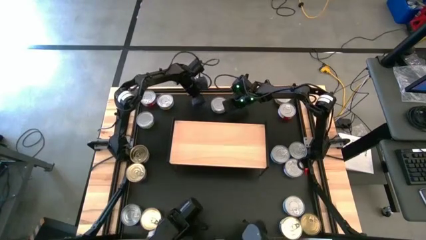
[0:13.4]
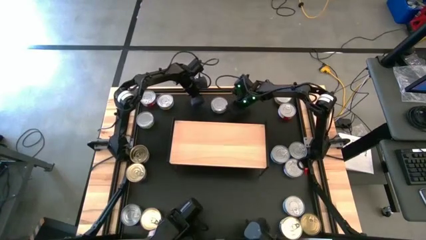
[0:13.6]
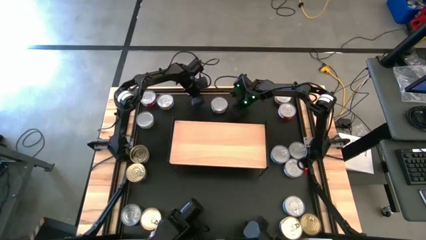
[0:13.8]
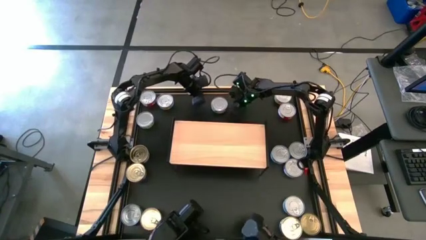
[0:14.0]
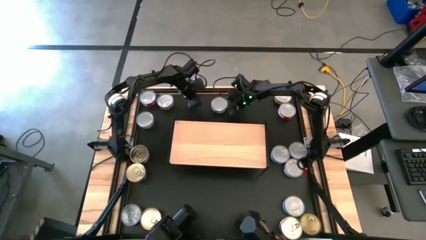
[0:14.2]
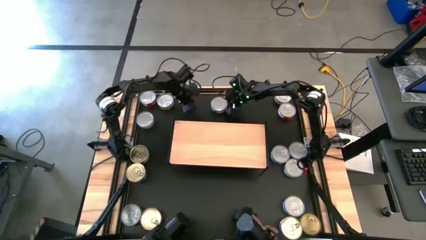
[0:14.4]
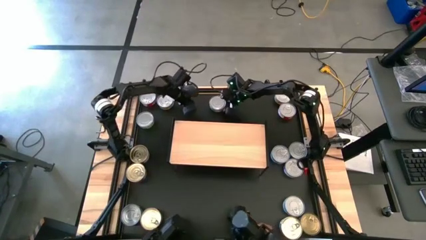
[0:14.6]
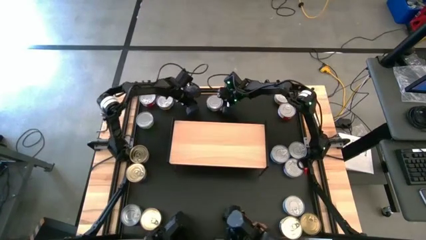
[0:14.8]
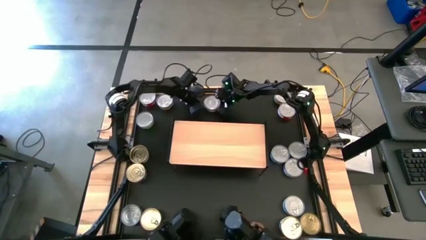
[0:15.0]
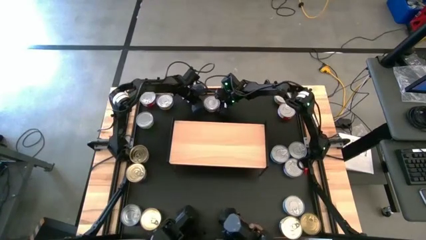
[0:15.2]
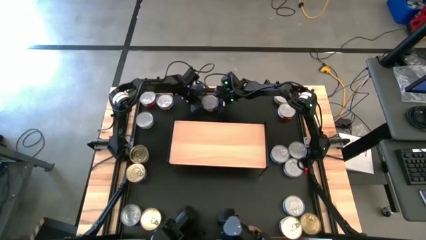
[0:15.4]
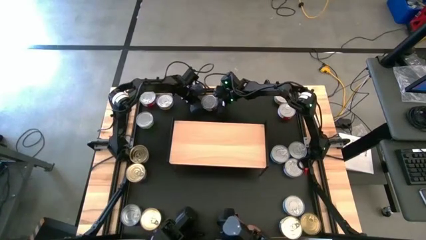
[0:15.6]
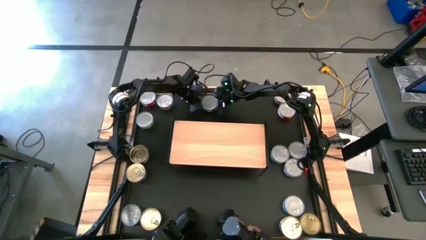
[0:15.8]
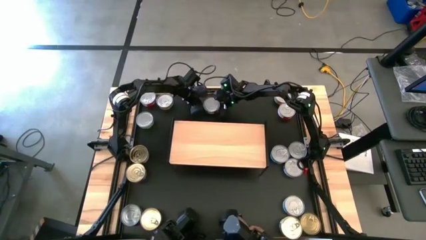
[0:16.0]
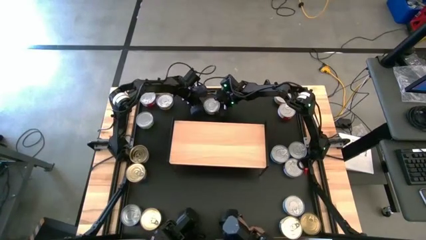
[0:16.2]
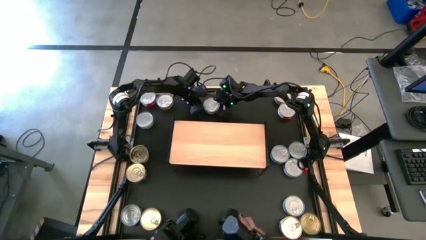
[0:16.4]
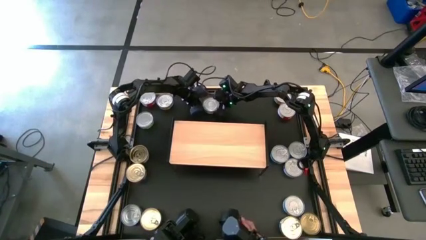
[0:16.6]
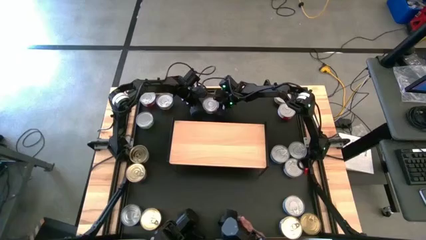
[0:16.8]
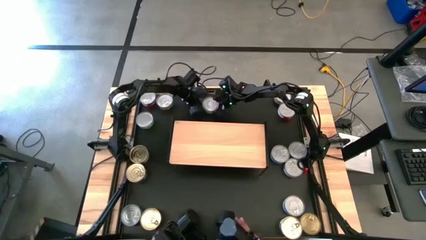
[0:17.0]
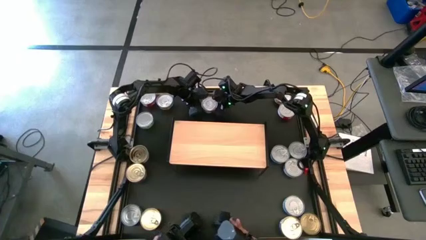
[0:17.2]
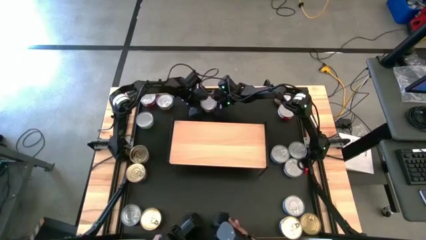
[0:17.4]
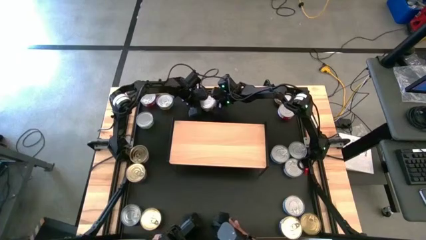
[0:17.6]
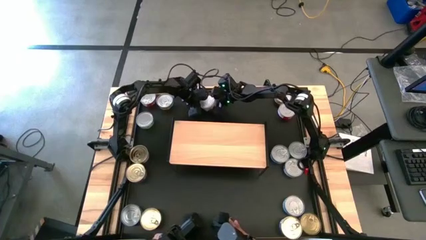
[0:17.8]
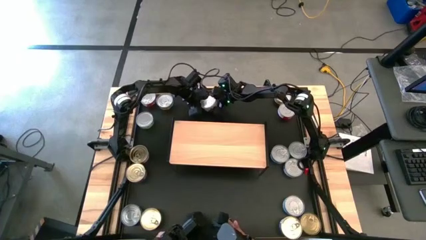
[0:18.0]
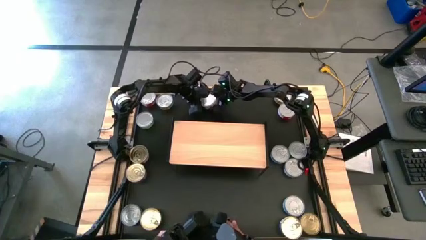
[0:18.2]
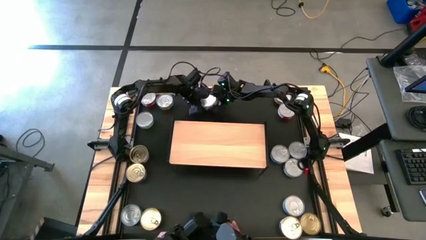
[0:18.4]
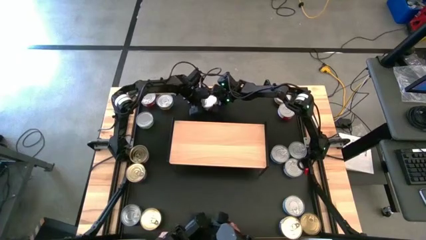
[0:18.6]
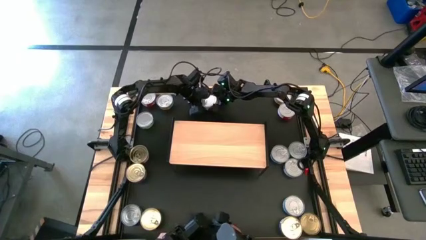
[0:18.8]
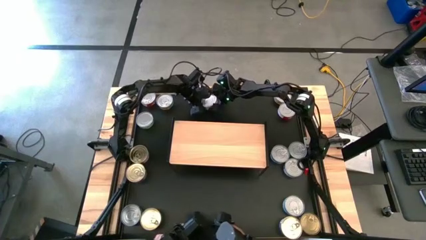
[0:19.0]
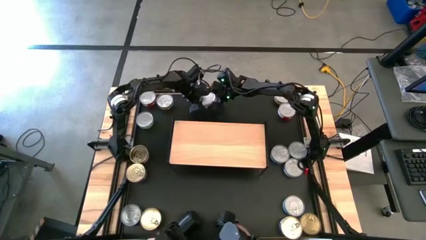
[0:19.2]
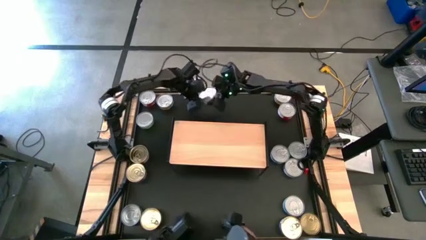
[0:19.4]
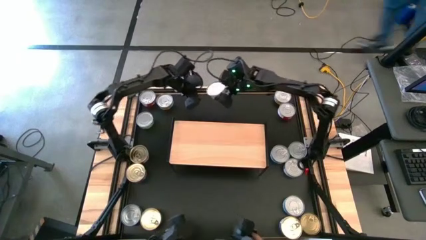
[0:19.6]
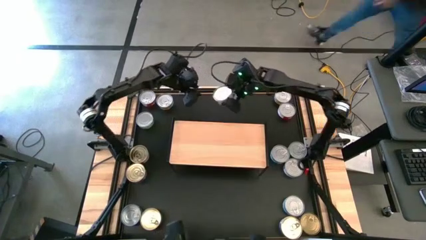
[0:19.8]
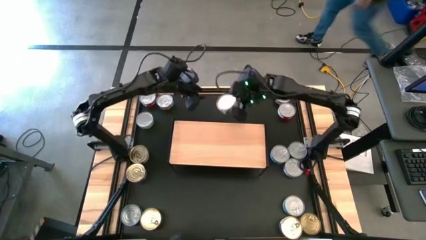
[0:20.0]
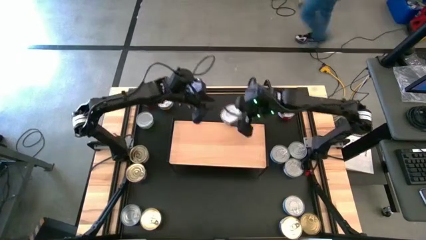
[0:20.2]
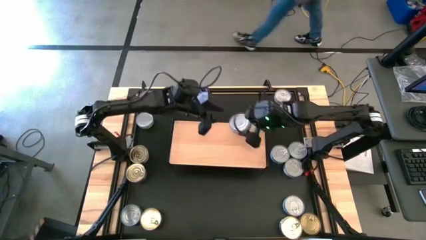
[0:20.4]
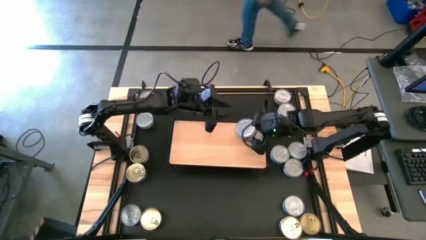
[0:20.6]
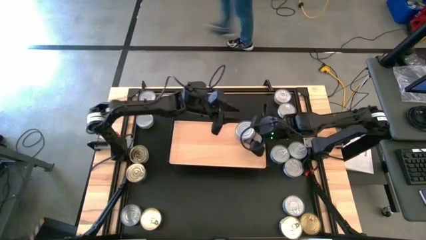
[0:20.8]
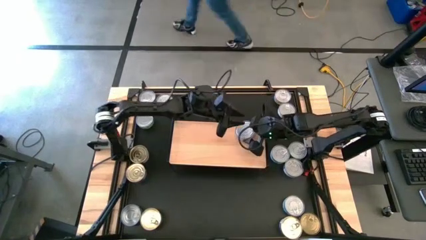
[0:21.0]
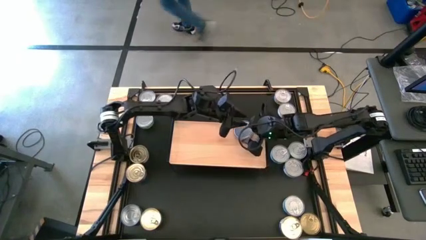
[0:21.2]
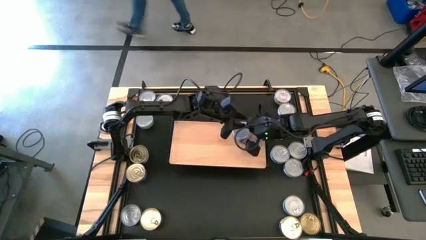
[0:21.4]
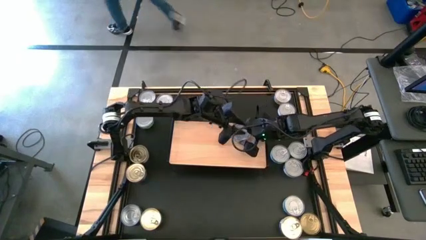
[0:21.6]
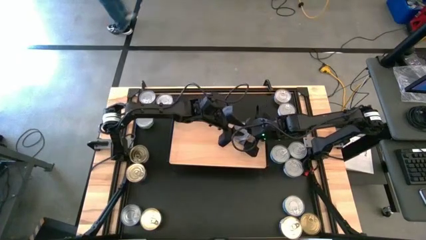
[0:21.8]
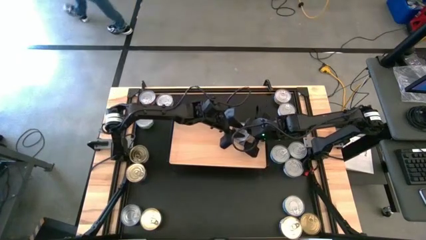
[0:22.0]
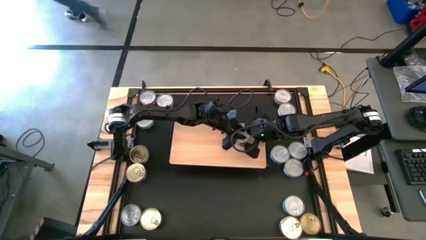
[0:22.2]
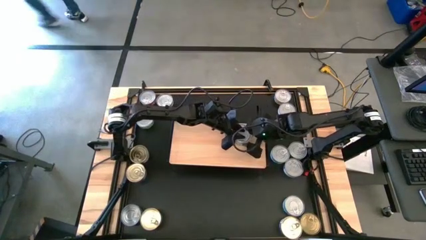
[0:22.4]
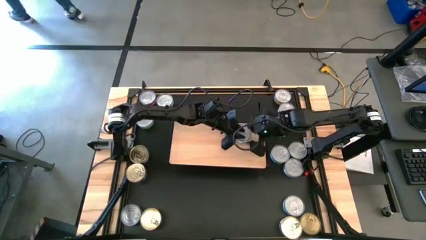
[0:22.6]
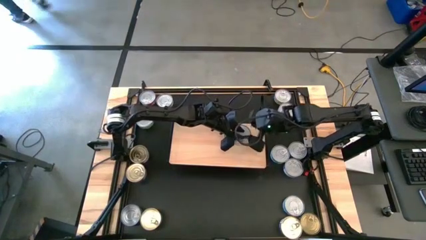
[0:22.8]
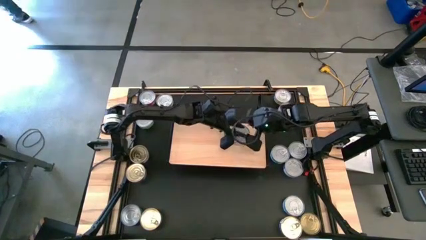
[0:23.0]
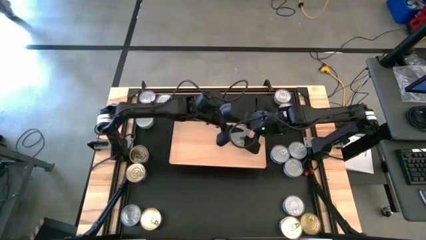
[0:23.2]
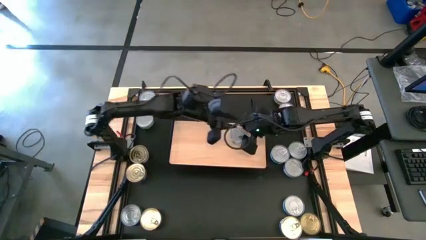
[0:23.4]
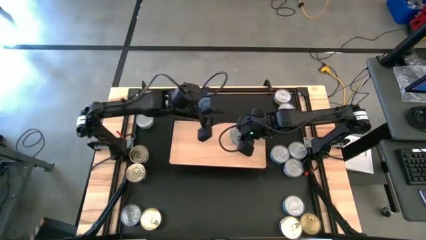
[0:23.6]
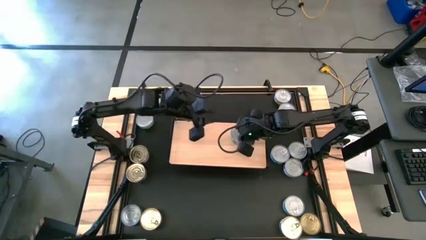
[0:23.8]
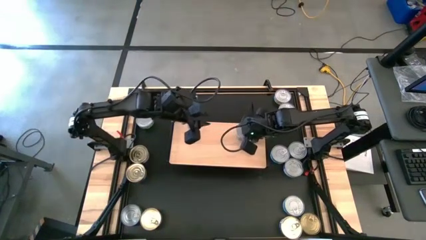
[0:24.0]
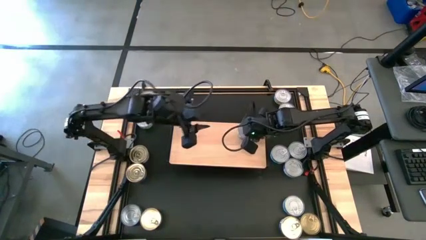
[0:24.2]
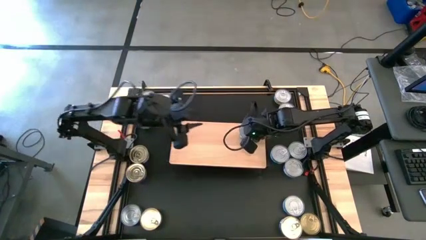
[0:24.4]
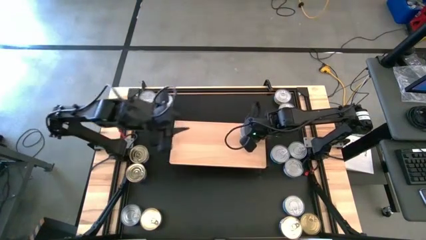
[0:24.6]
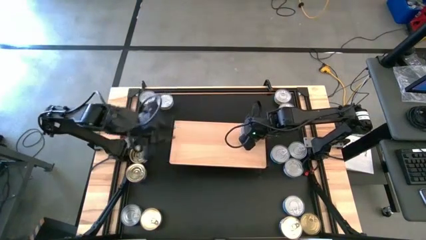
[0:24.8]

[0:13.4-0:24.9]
Task: Stack canned seafood by type on shelf
Put the green white tuna can on the shelf

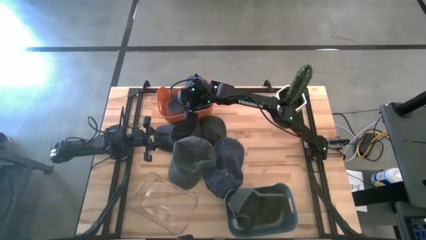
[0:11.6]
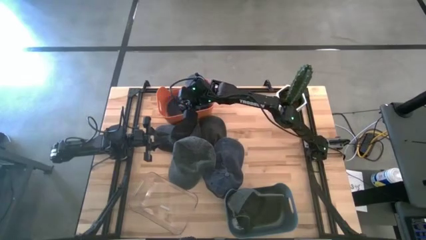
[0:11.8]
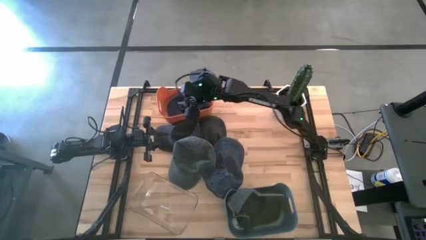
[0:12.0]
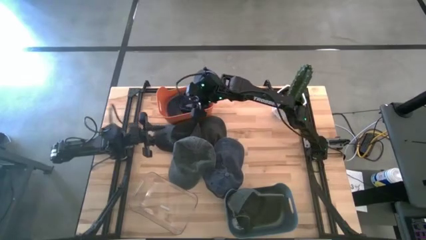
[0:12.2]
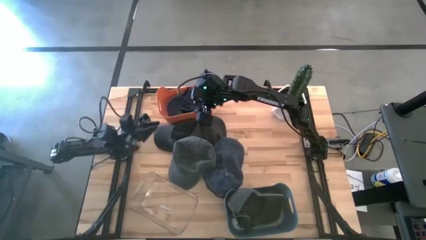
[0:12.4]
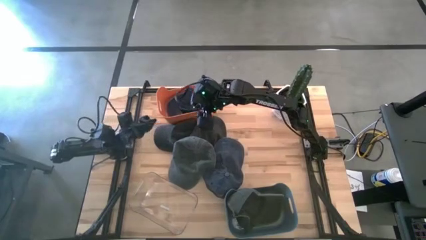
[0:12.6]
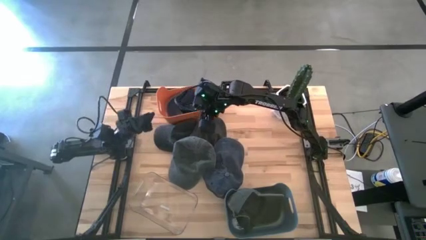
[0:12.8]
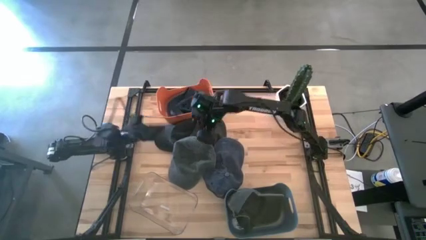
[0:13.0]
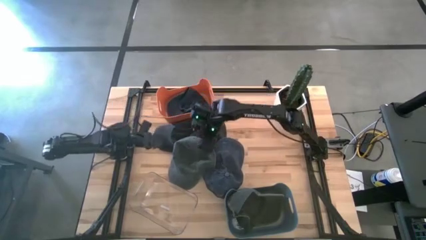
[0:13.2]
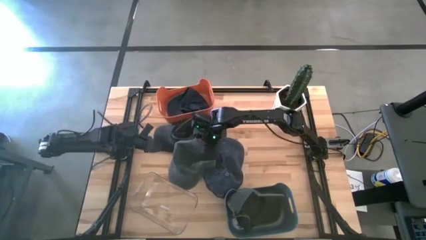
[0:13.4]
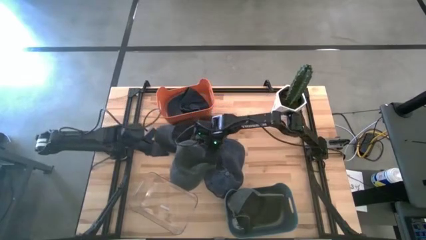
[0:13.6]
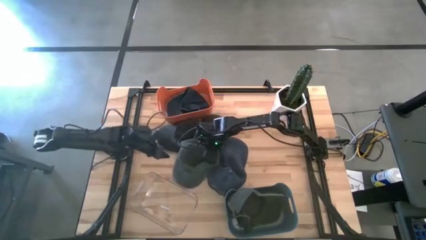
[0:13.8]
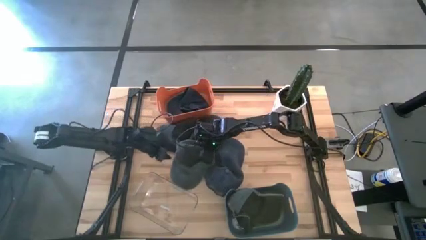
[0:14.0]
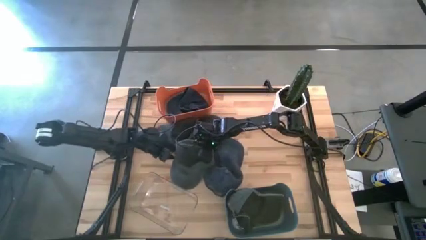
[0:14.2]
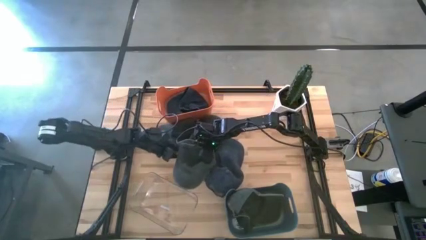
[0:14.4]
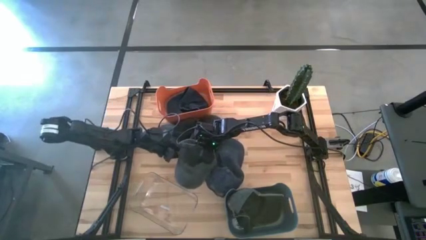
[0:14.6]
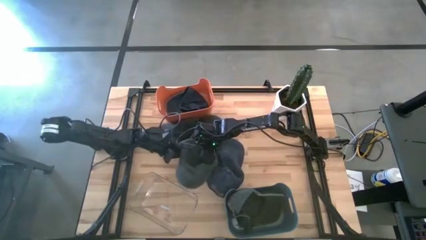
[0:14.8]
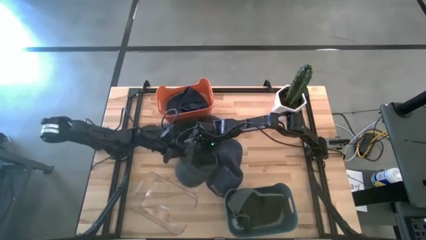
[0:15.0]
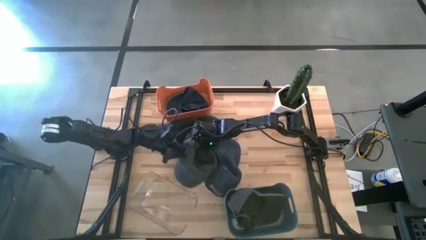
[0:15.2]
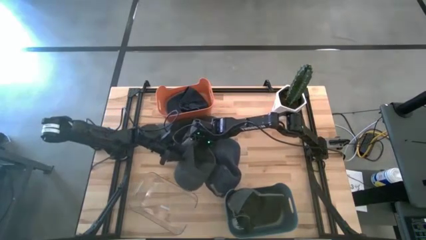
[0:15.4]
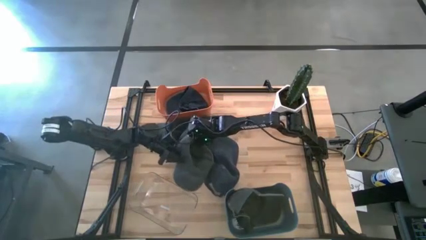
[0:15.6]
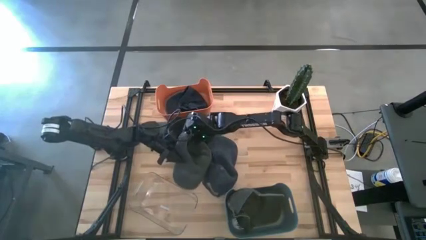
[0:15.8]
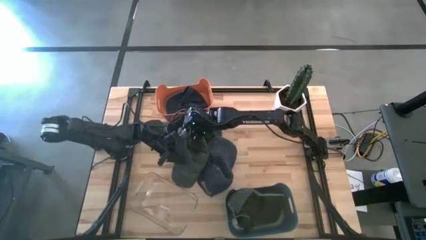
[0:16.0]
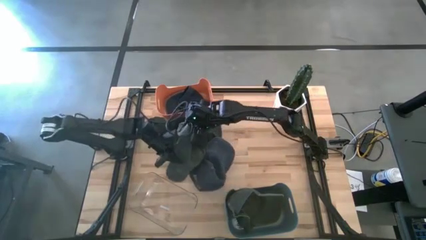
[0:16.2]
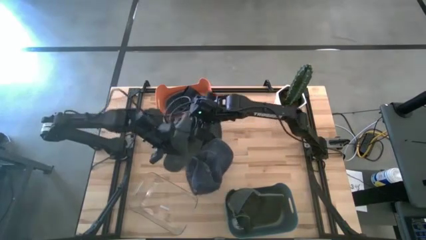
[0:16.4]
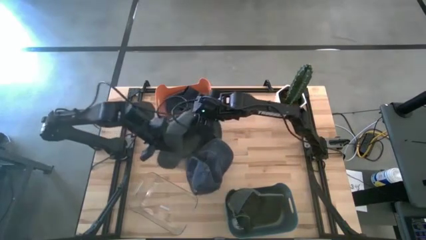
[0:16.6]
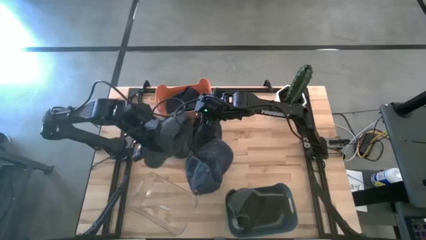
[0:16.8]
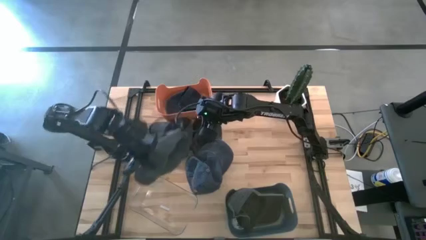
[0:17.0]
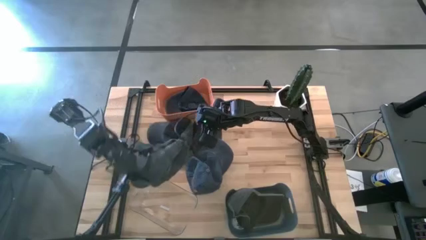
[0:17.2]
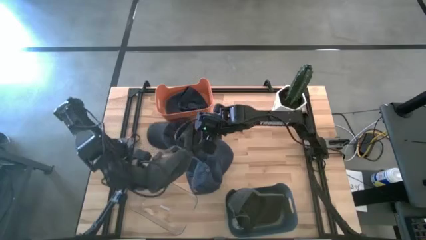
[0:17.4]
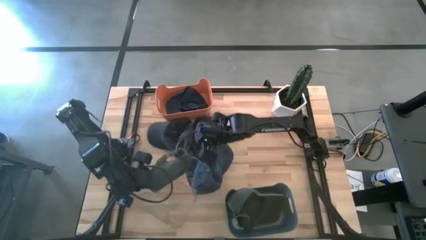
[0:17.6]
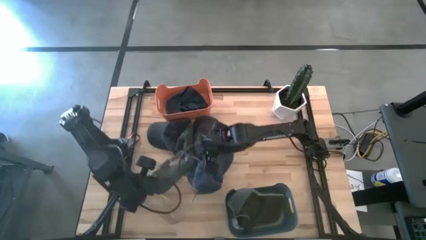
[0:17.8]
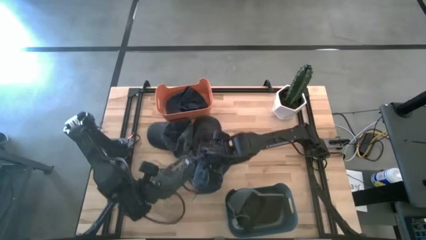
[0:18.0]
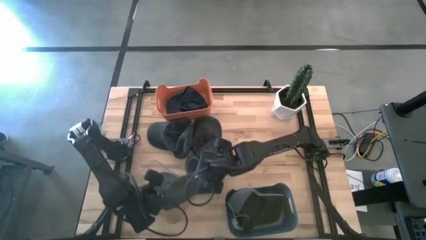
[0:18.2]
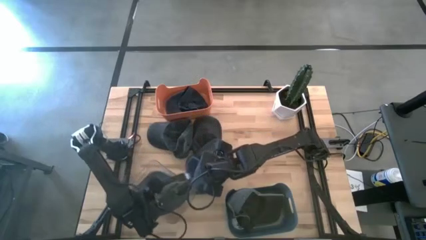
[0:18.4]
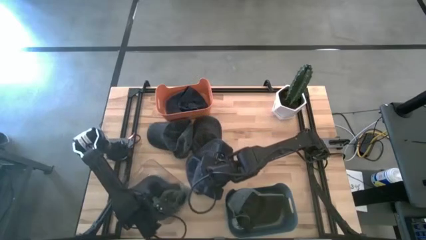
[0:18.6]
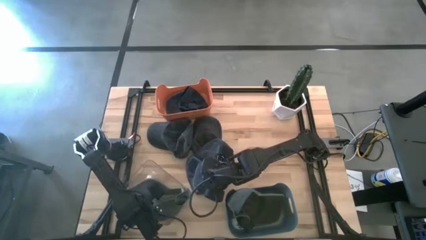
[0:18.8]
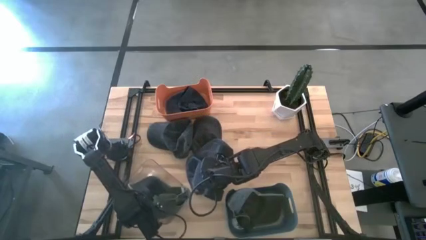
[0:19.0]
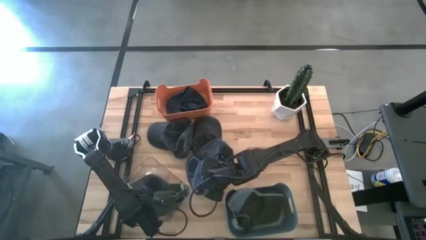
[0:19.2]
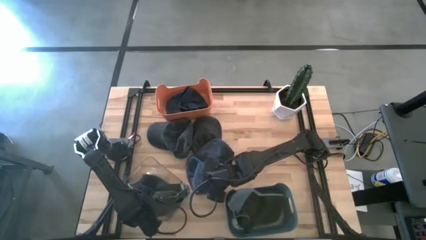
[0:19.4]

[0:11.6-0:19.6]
Task: Pick & Place hat
Put the green cap into the transparent bin
